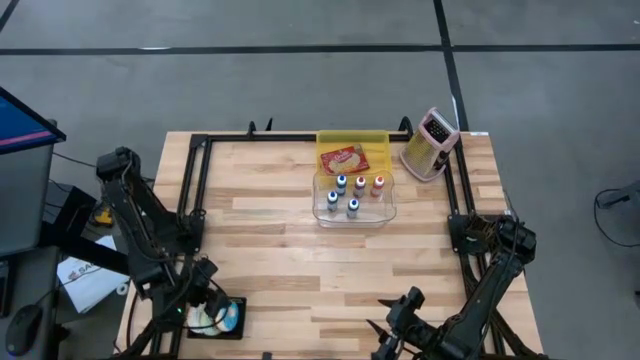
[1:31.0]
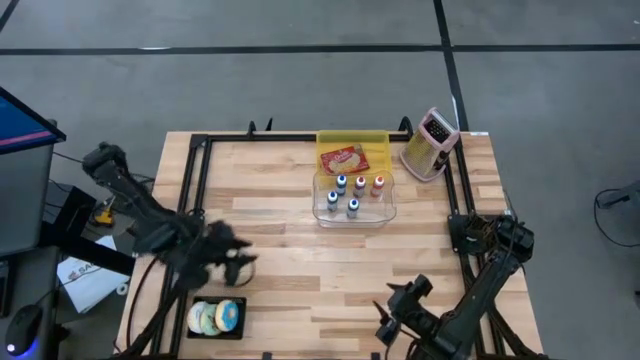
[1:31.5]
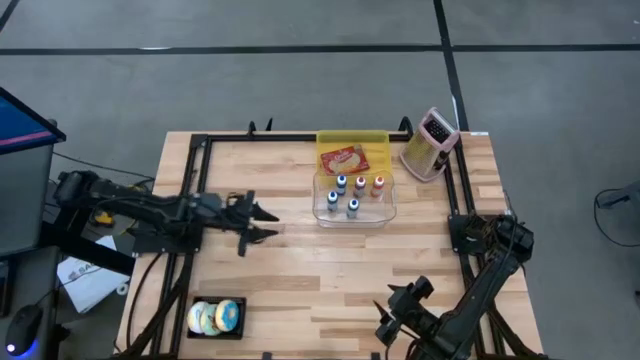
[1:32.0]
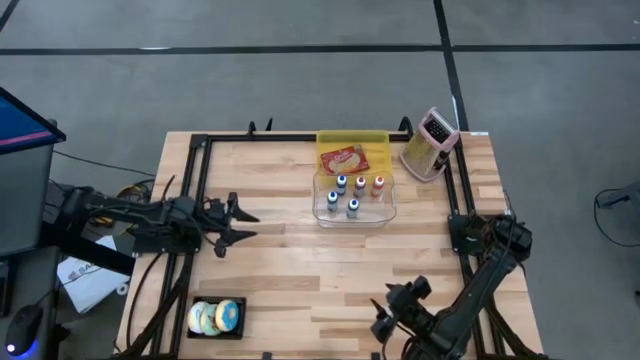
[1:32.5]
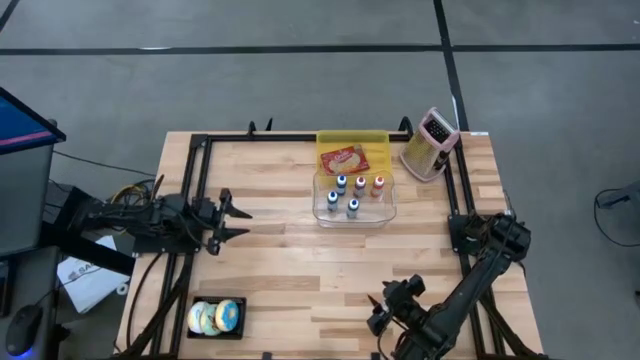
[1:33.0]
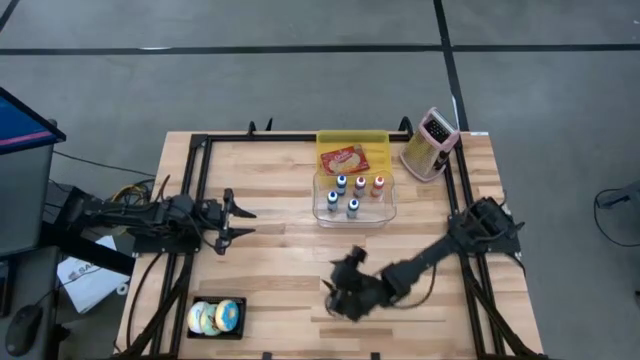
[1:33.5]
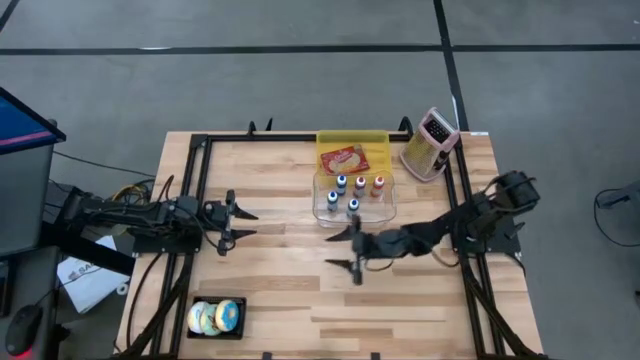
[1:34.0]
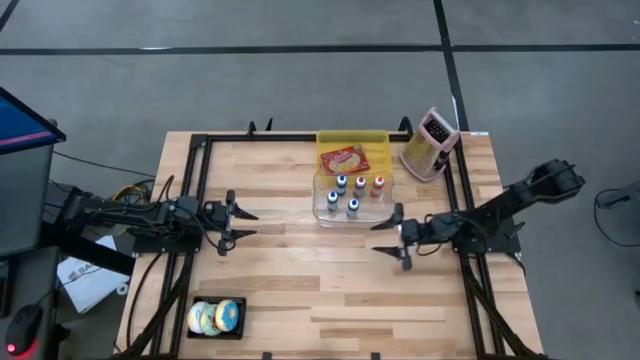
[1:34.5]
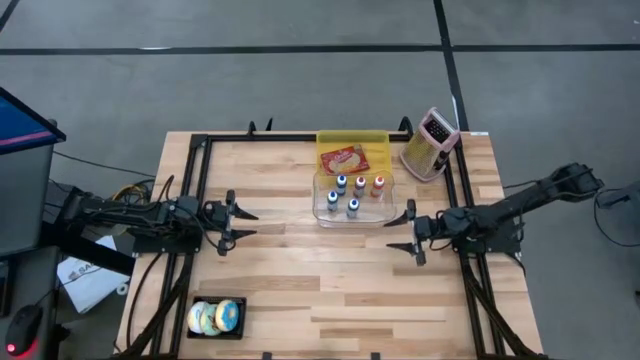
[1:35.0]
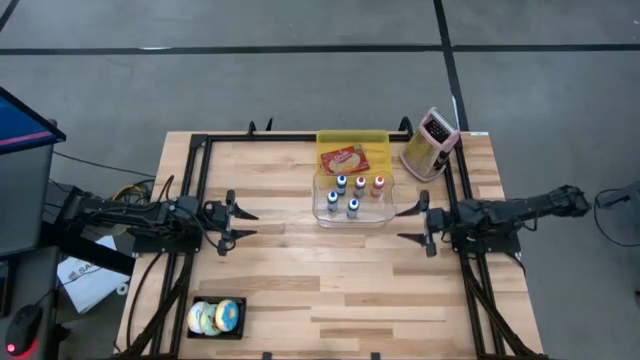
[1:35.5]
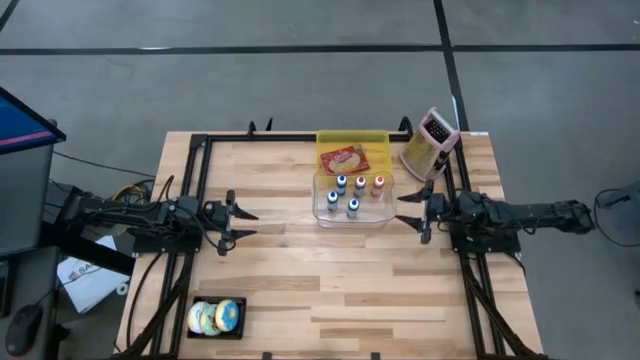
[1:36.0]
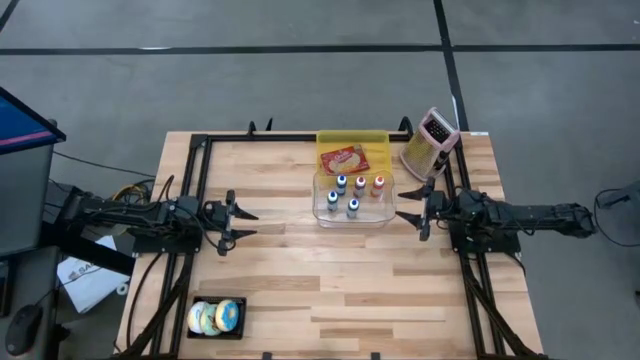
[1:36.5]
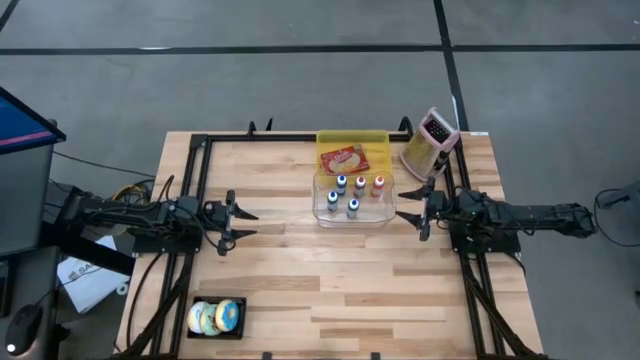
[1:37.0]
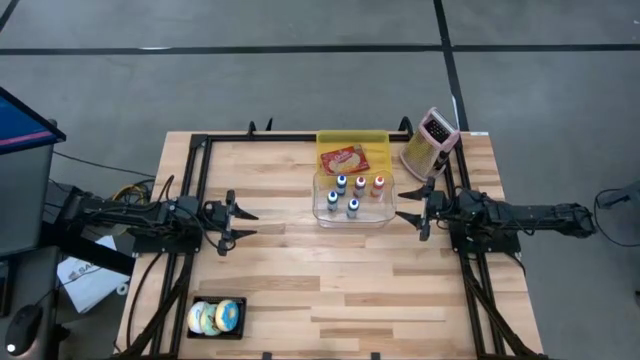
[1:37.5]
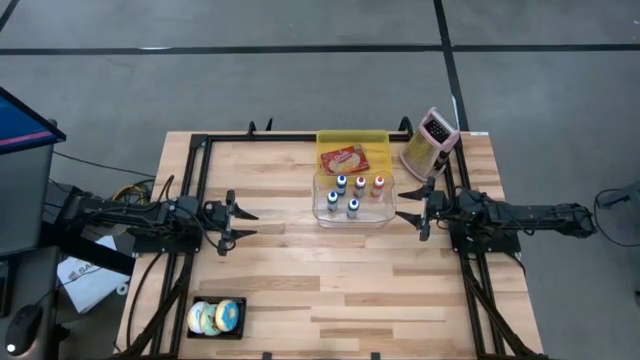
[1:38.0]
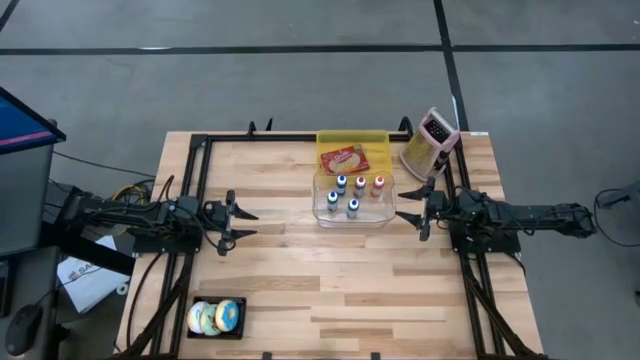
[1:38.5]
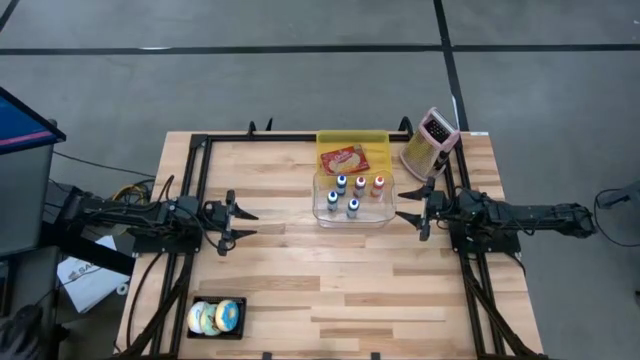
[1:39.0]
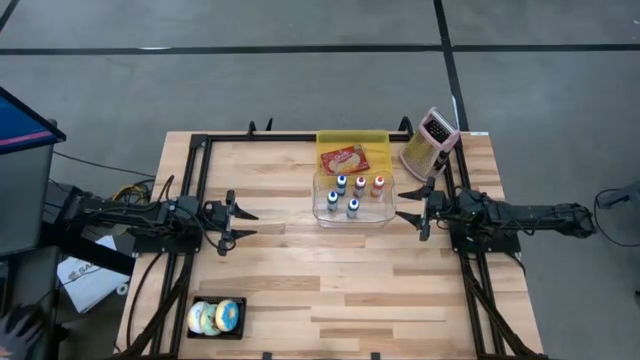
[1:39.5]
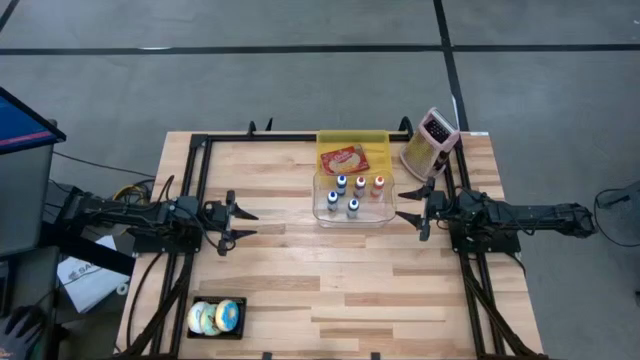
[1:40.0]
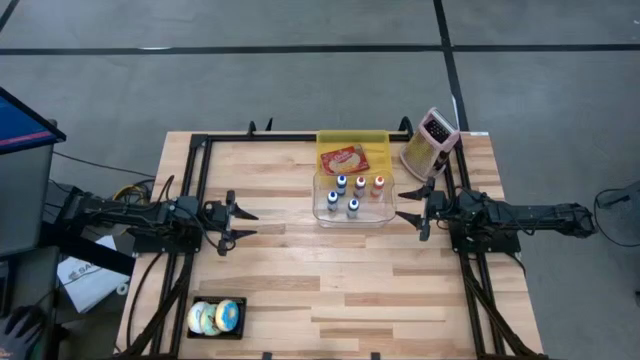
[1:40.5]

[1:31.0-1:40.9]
Return to Home Position

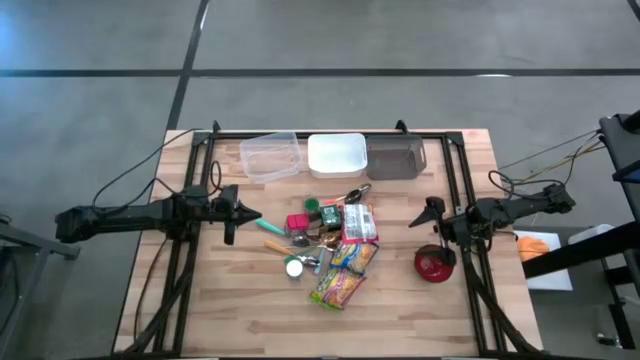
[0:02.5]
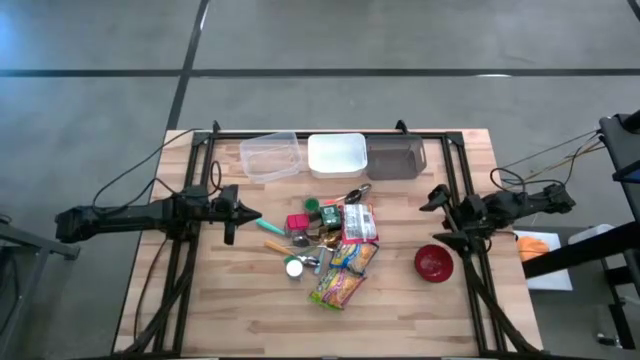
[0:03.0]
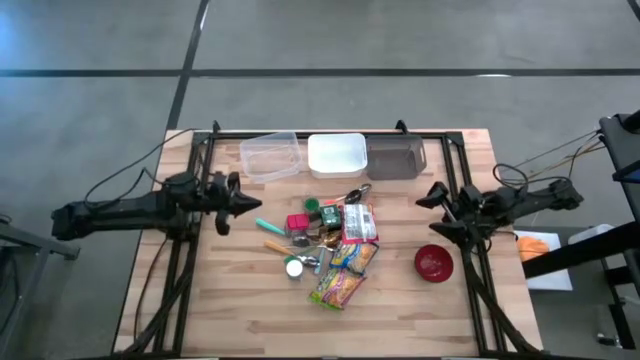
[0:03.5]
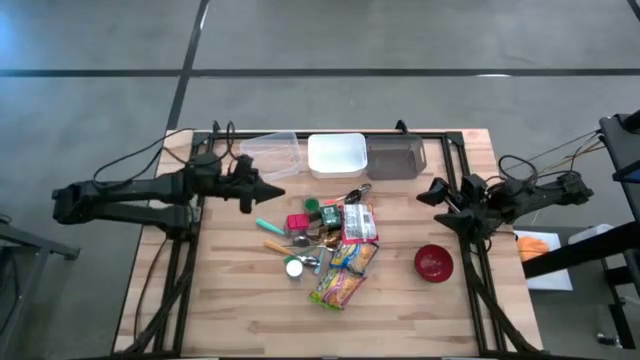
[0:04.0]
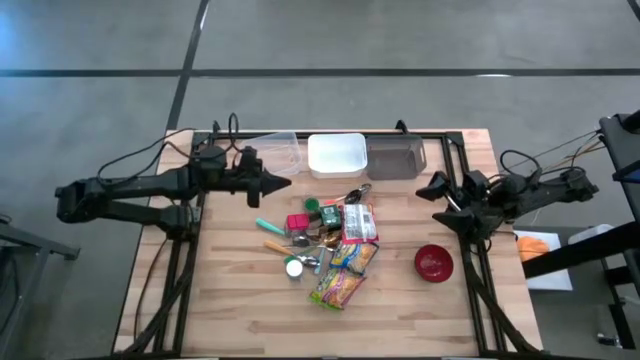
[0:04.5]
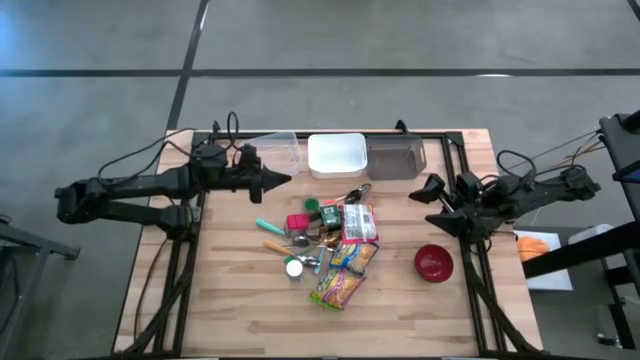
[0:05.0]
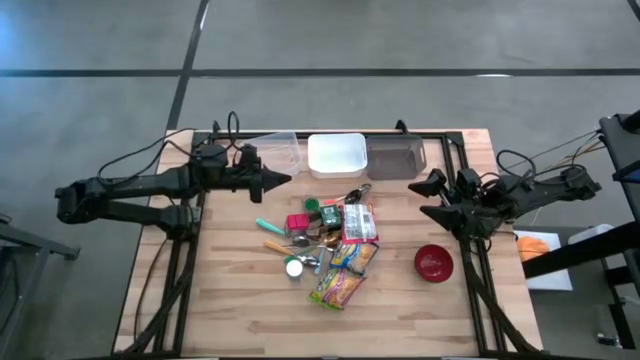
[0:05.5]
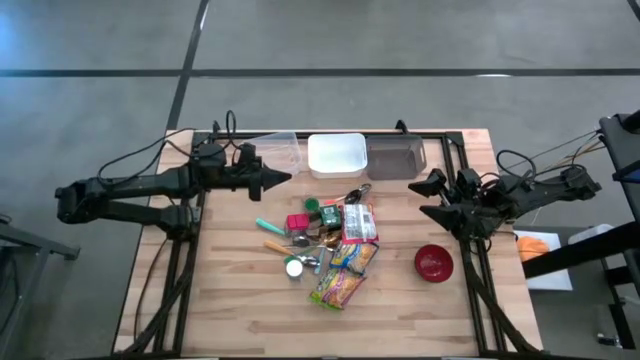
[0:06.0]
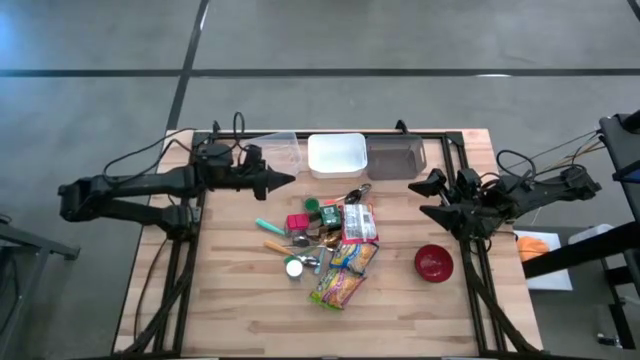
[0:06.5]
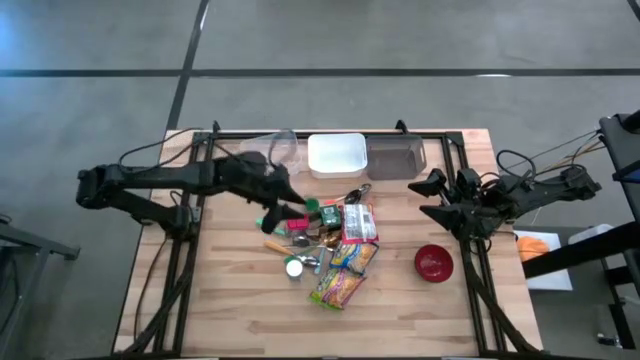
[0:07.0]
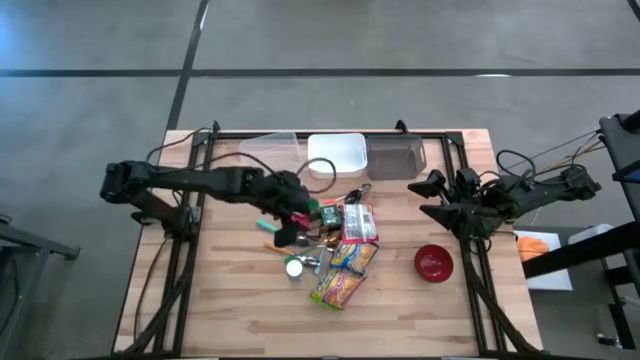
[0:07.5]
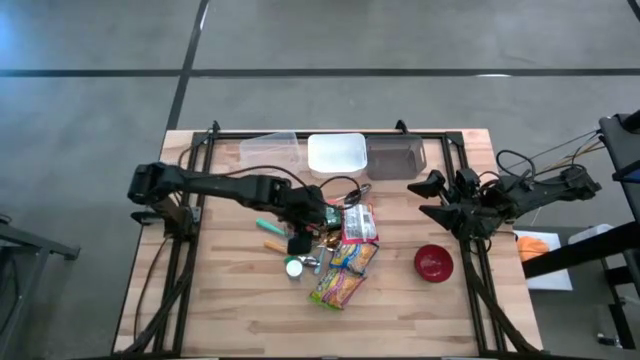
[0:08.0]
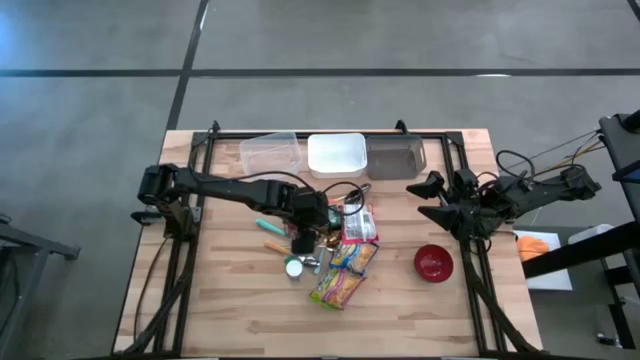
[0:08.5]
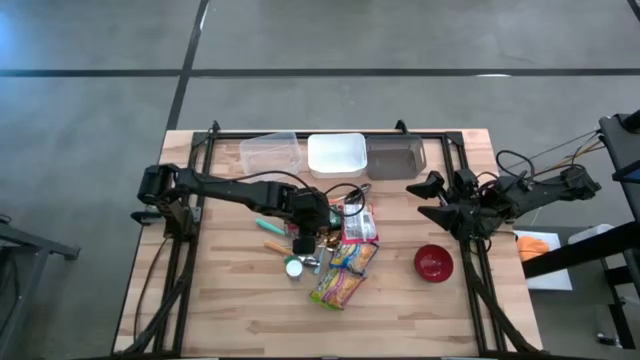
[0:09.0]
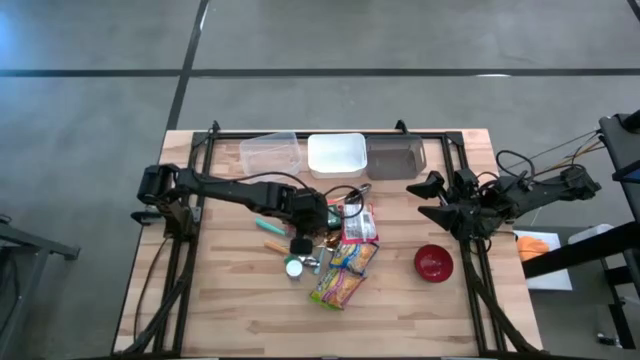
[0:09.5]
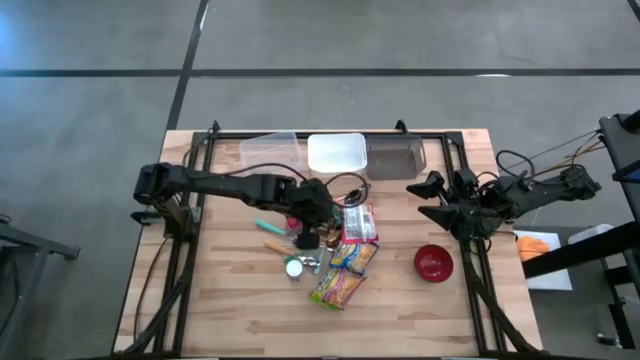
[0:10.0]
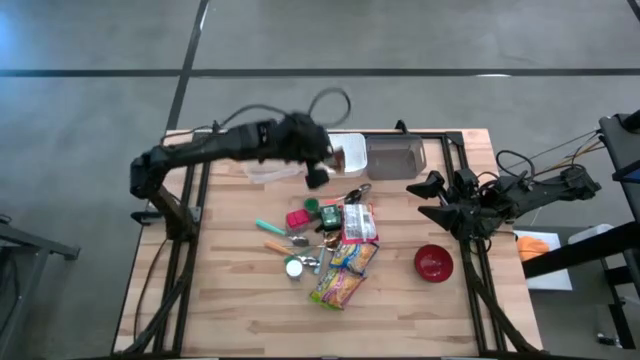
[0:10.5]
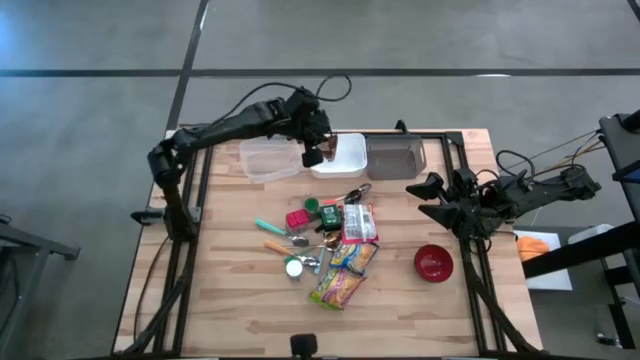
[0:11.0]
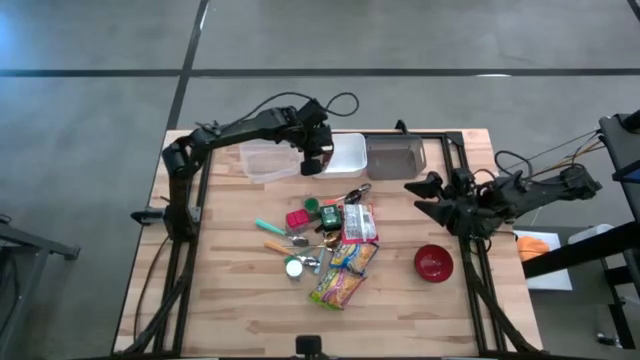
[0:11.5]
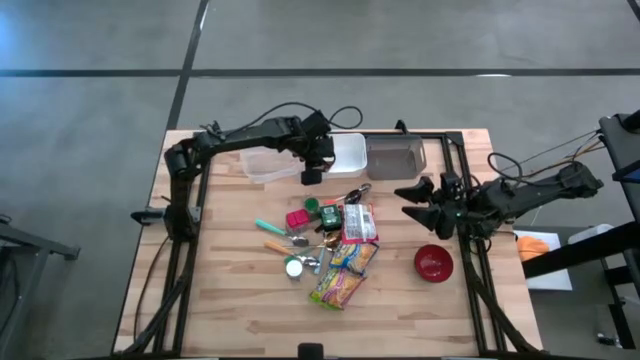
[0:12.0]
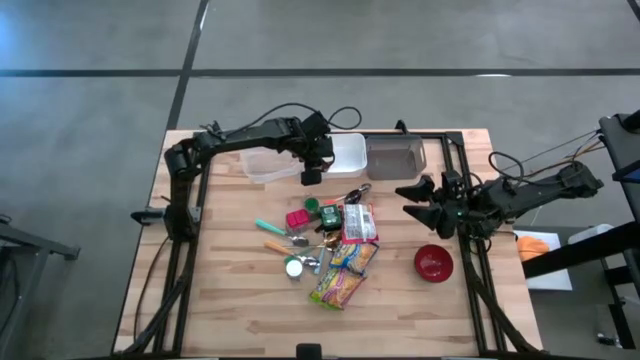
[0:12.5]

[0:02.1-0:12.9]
Put the orange seasoning bag into the white bin
